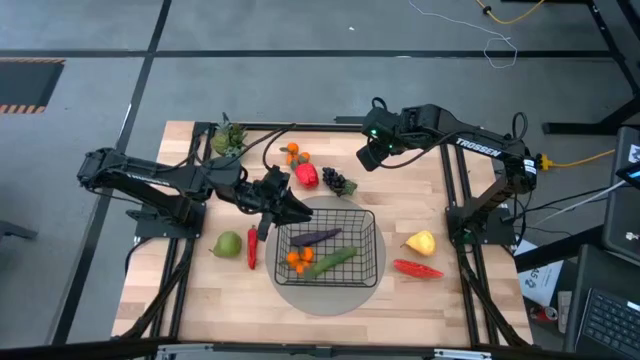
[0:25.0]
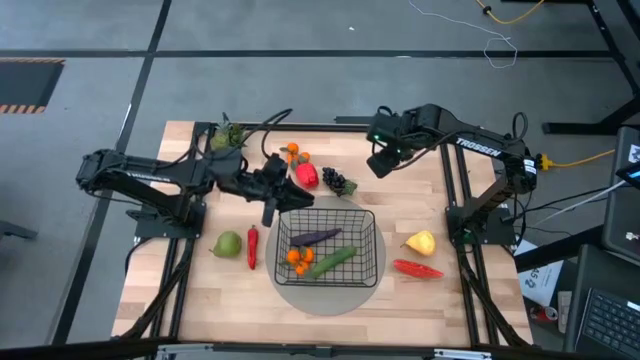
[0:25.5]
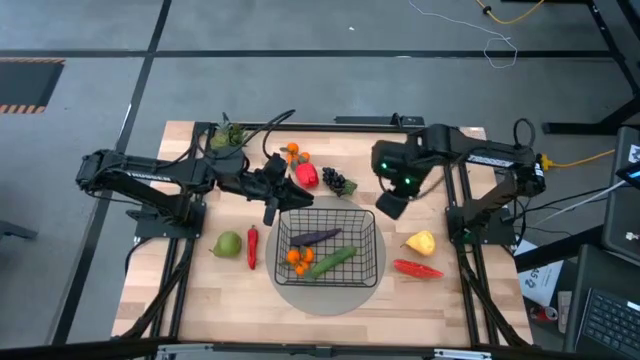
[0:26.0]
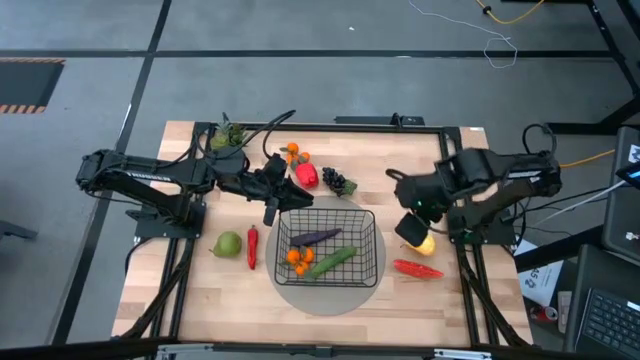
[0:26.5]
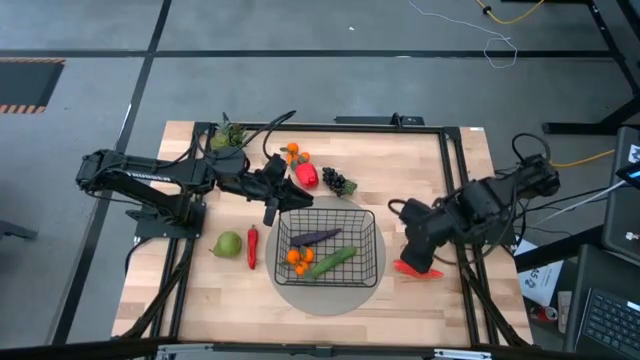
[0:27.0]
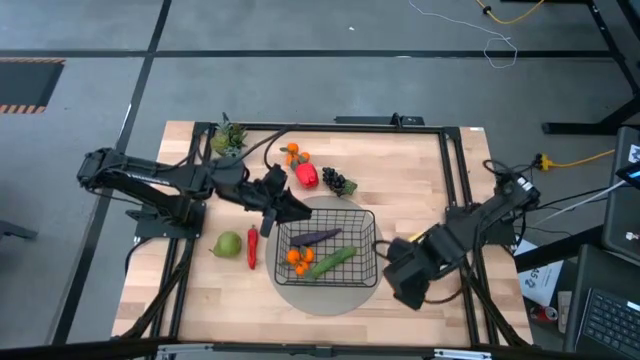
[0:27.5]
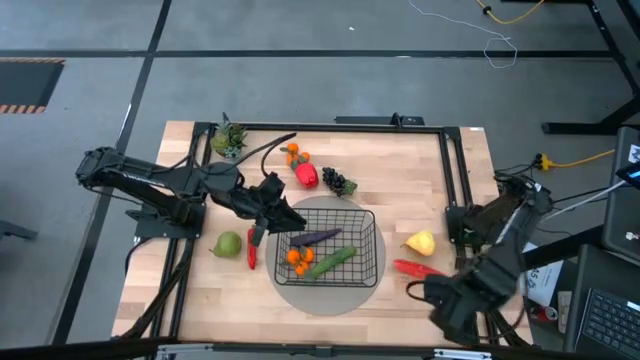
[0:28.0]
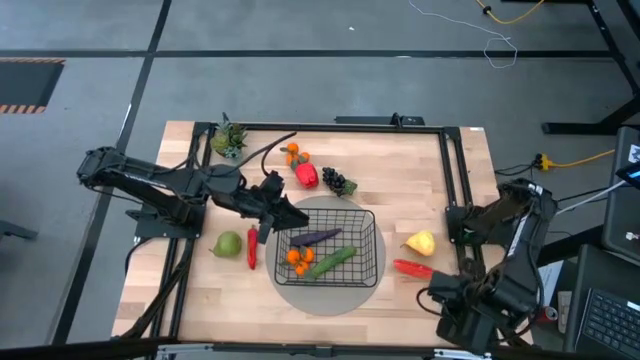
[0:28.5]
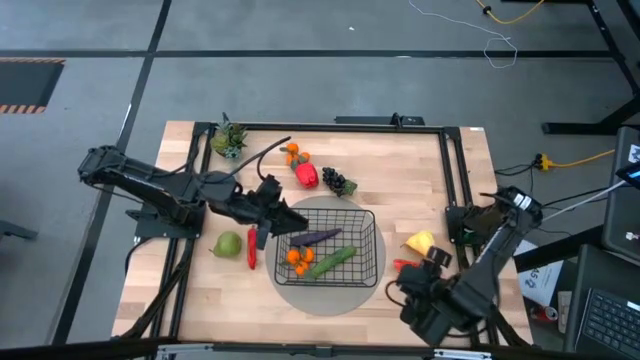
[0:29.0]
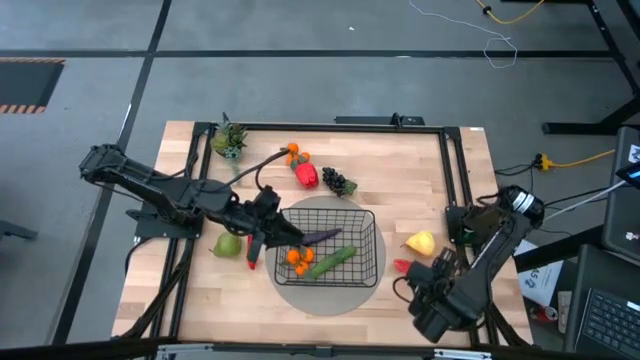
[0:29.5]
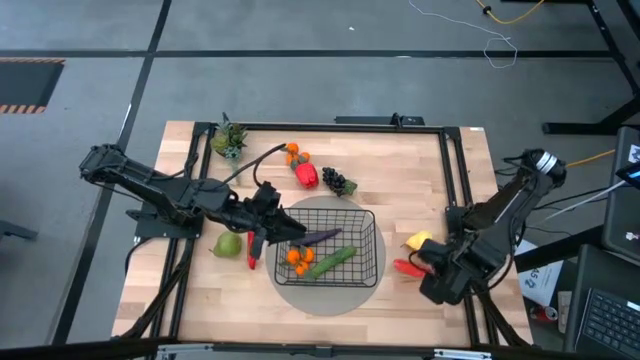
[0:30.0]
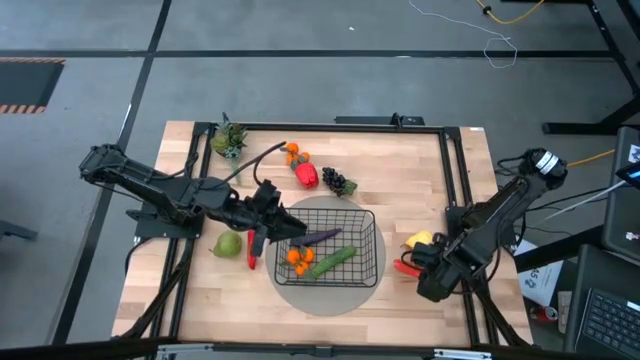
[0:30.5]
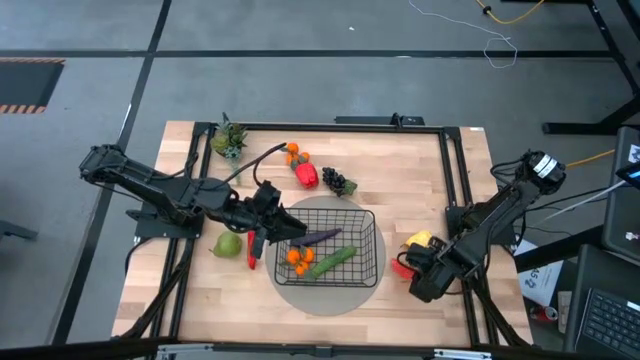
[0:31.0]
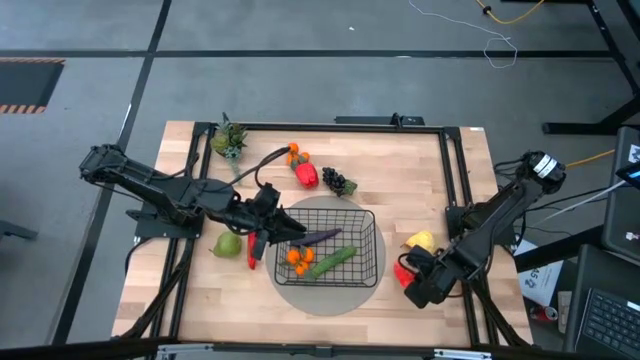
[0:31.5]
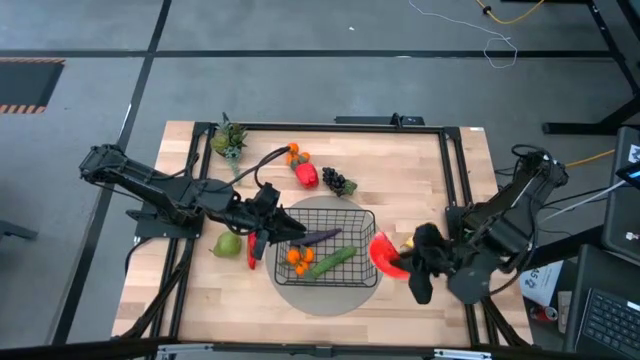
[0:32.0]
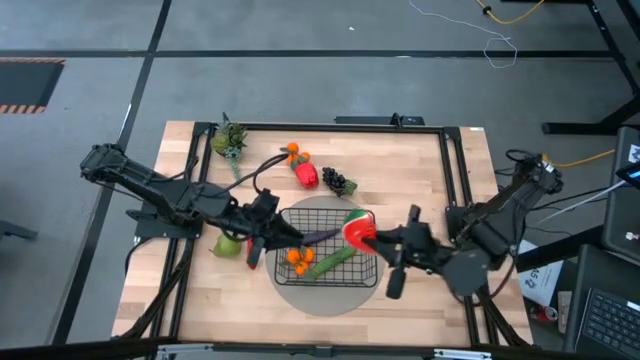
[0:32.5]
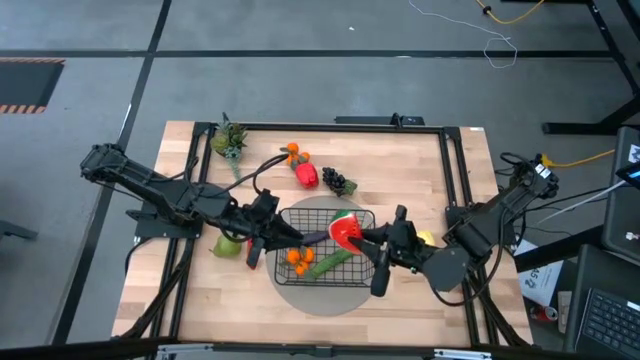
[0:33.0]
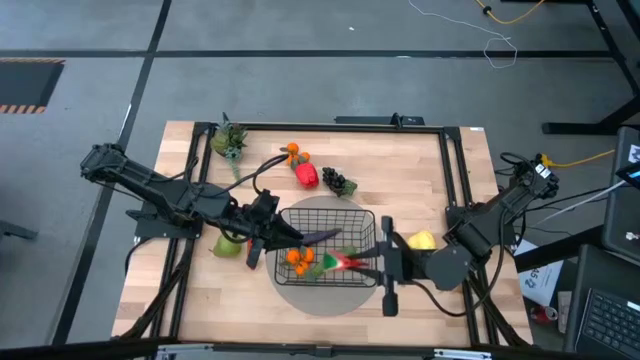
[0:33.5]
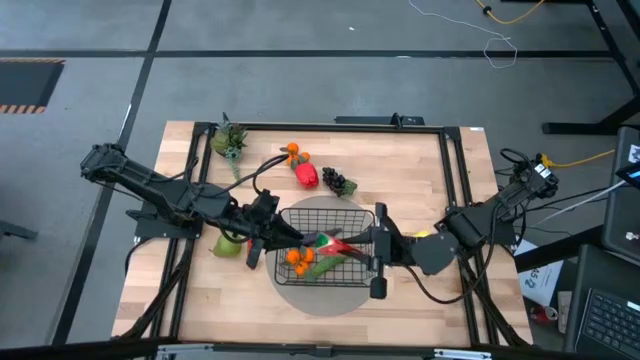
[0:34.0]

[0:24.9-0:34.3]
Task: Build produce basket
Put the green watermelon slice into the black wire basket

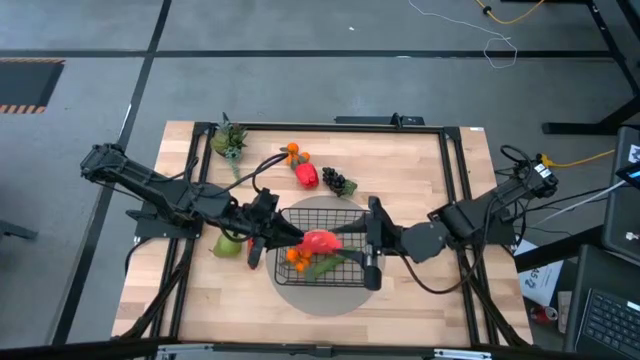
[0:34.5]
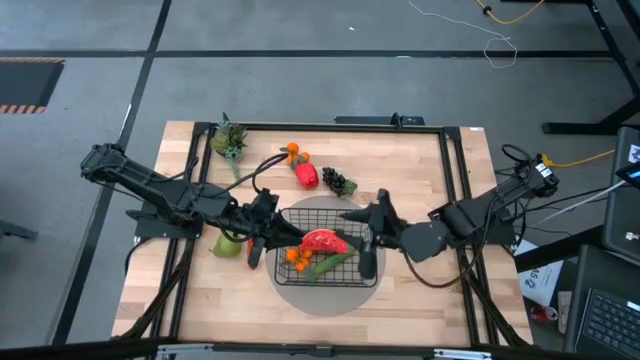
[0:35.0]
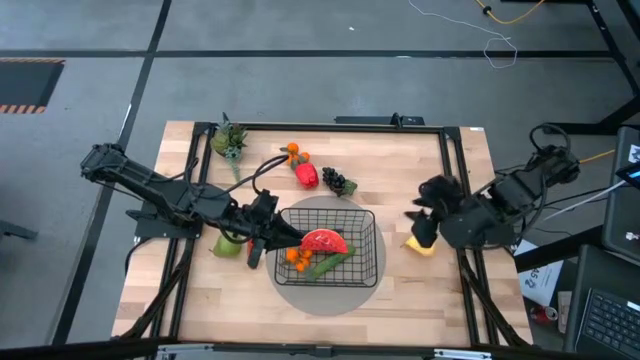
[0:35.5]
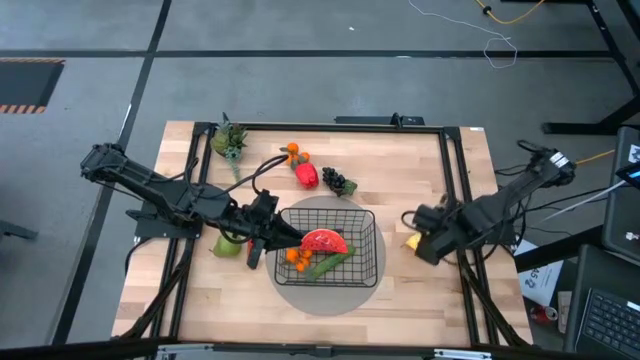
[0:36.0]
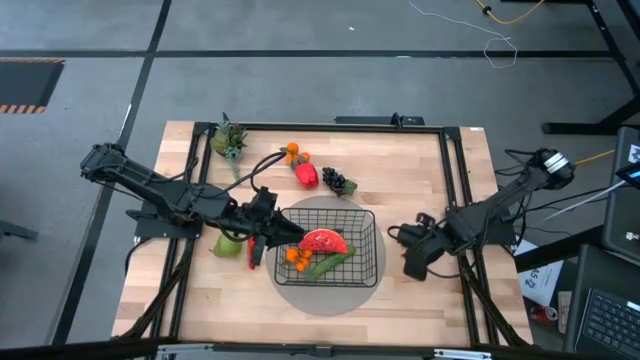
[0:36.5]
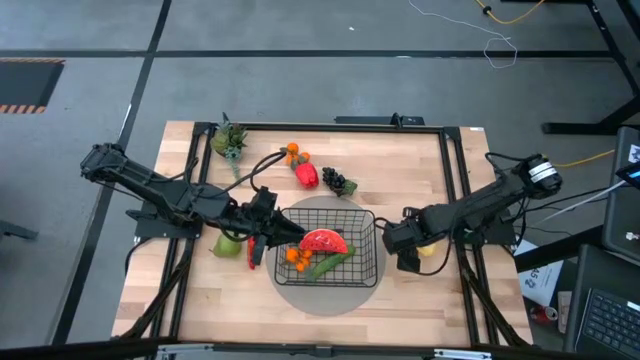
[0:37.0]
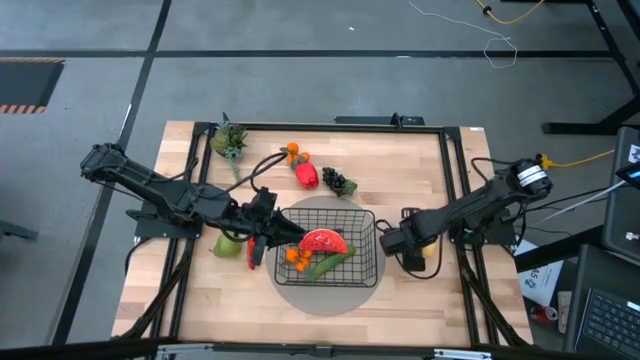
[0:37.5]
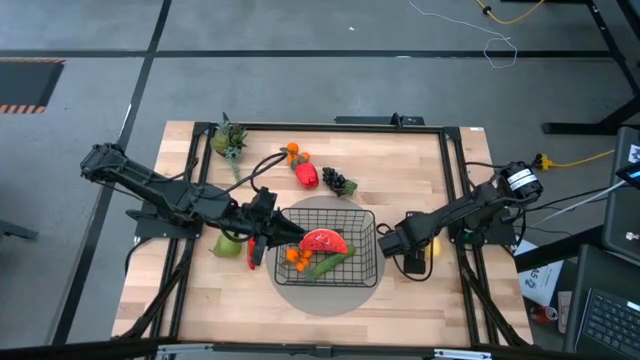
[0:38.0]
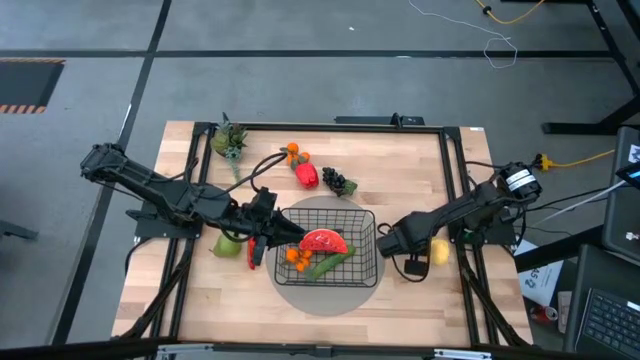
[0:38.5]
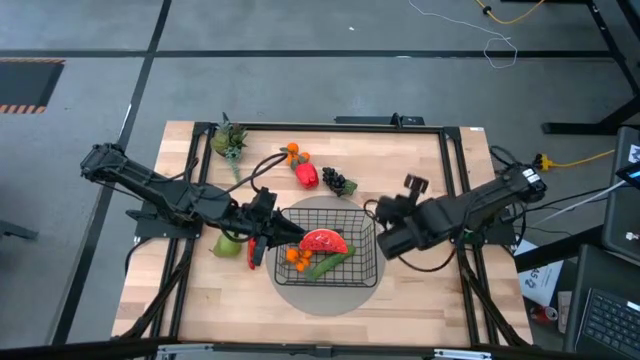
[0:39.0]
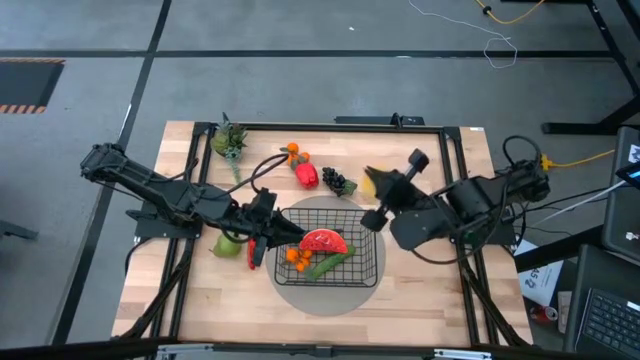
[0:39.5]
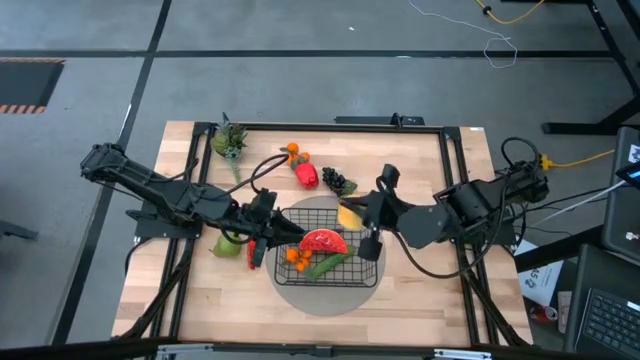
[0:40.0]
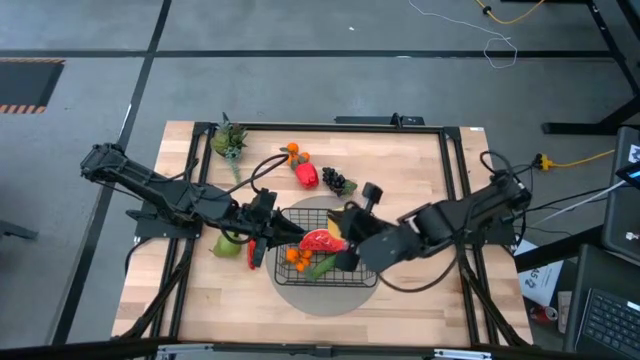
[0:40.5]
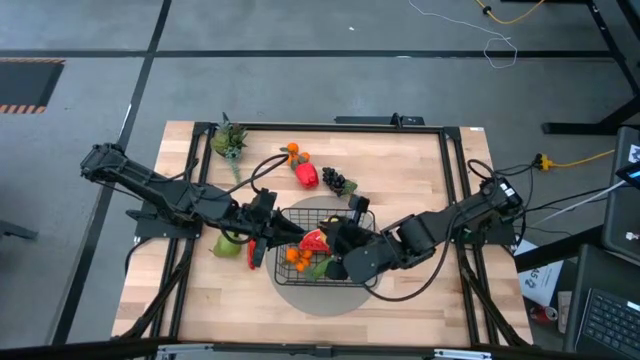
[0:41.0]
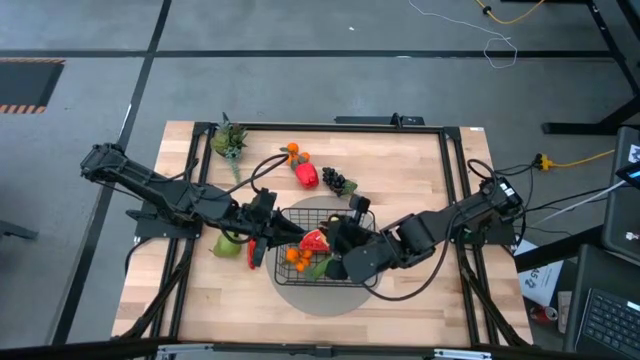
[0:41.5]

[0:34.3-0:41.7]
Put the yellow pear into the black wire basket

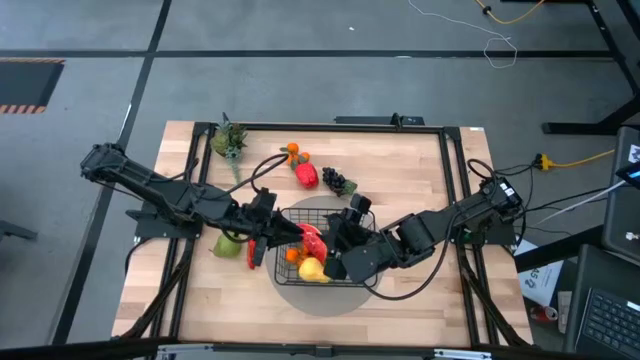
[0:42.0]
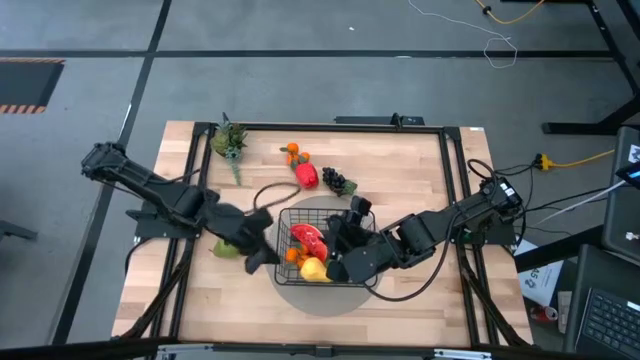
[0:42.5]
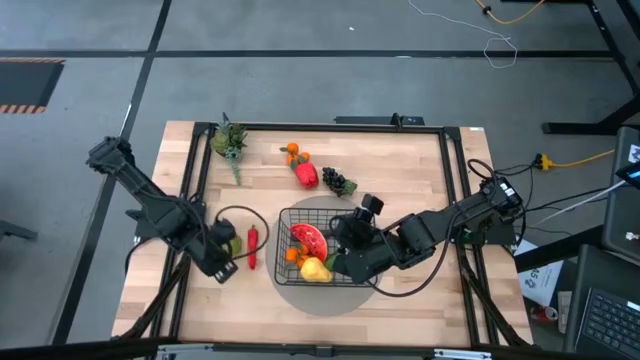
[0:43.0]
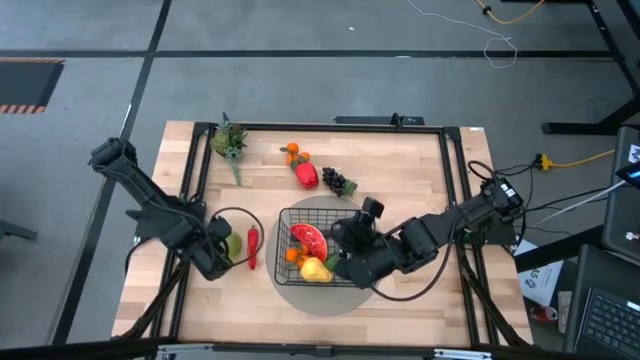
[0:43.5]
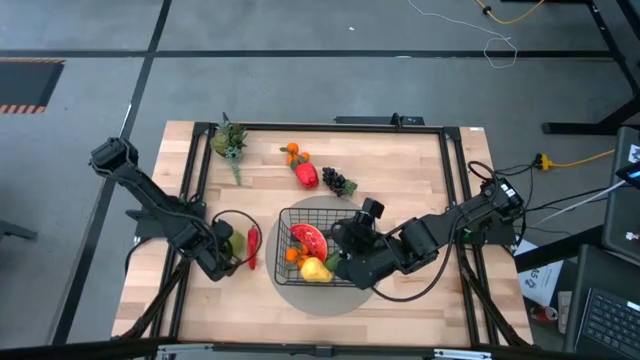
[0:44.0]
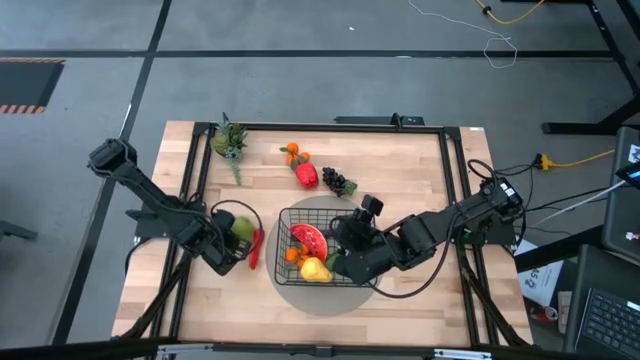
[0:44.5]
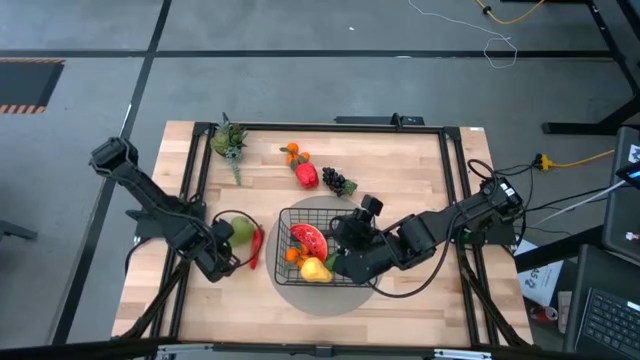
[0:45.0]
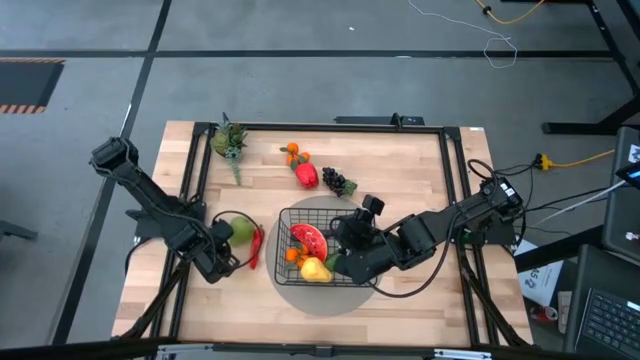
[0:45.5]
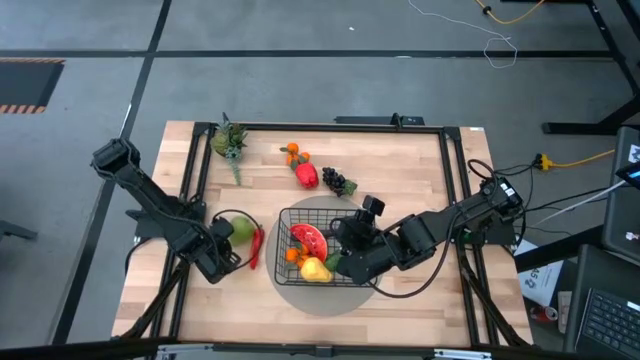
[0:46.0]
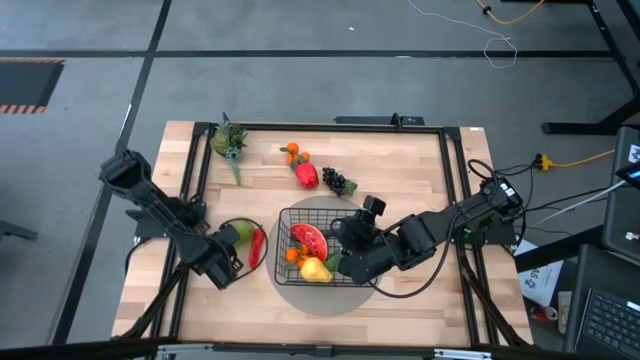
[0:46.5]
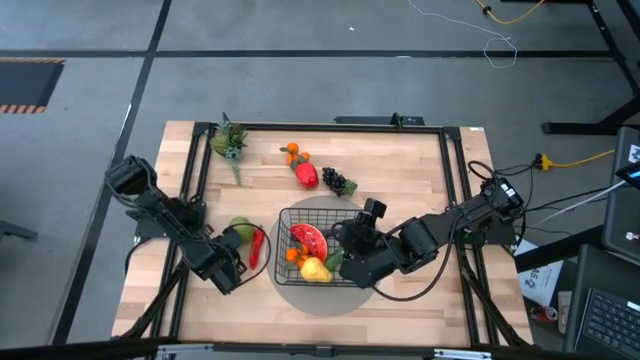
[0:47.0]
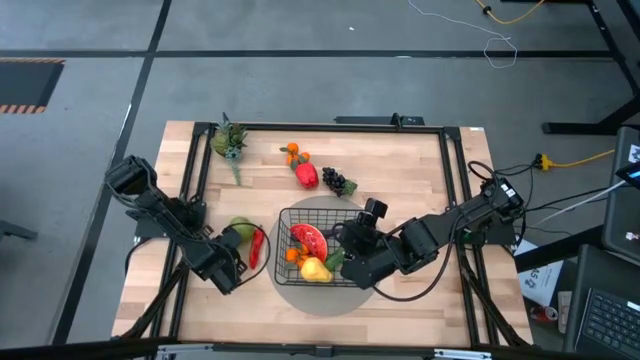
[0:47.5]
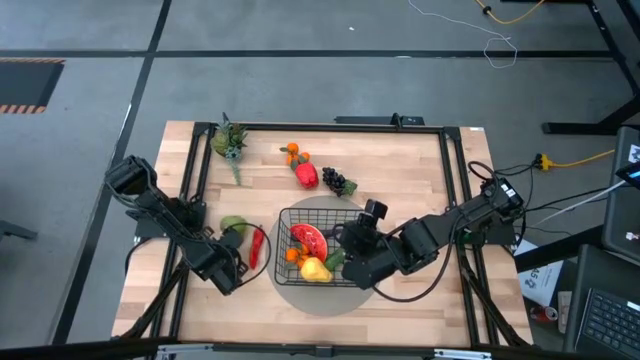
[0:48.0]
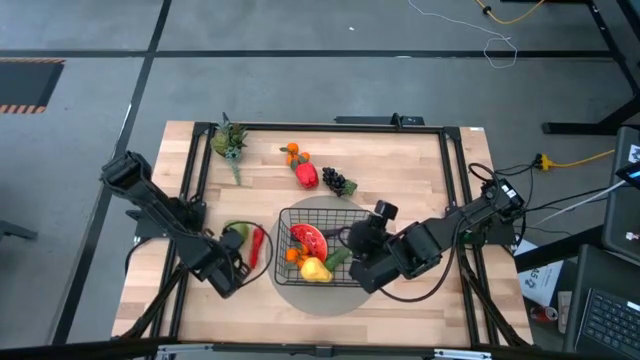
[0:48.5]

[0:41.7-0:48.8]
Put the green pear into the black wire basket
